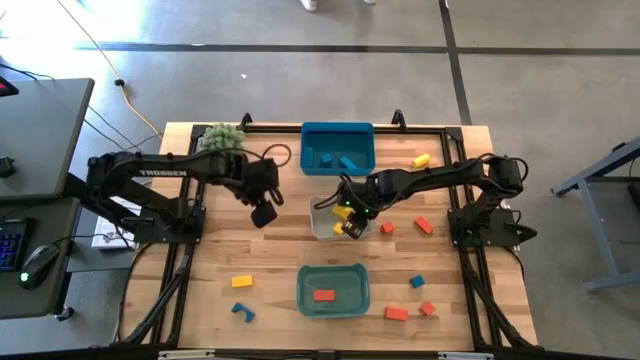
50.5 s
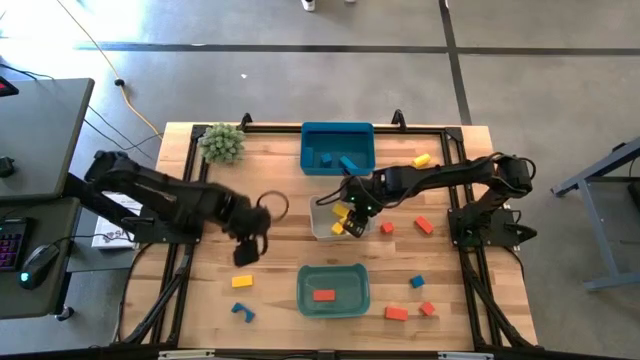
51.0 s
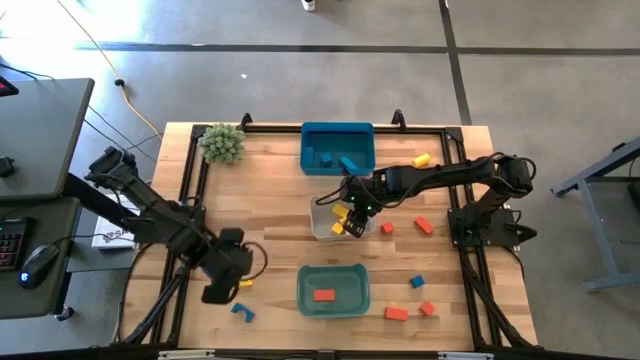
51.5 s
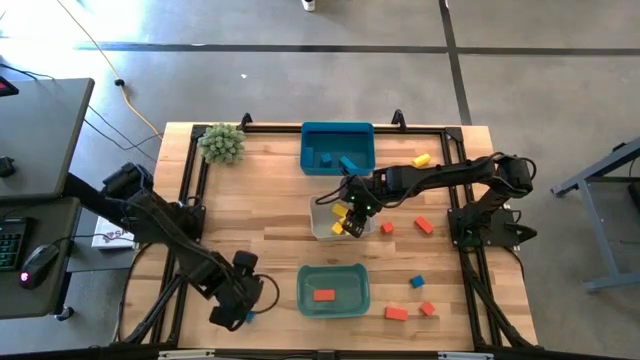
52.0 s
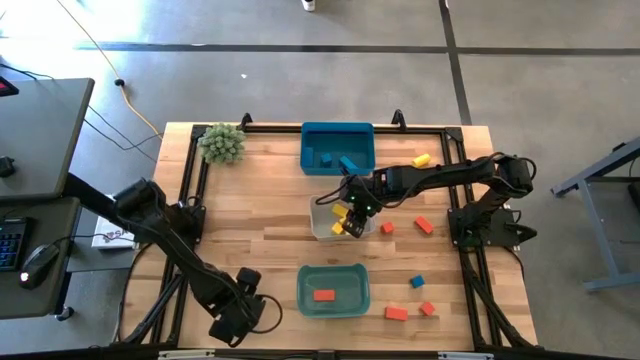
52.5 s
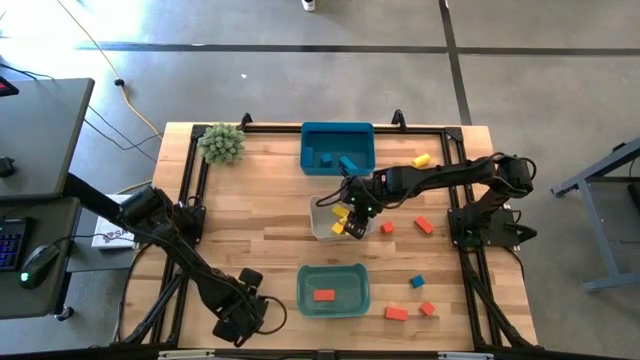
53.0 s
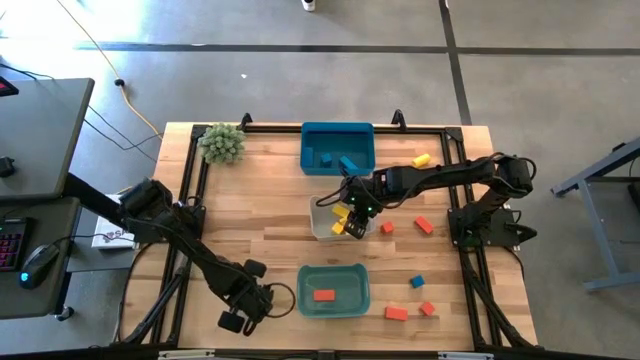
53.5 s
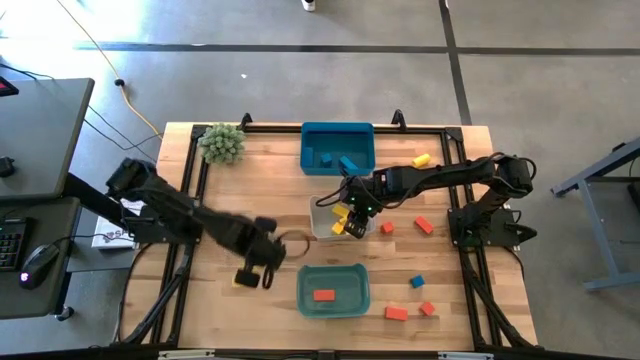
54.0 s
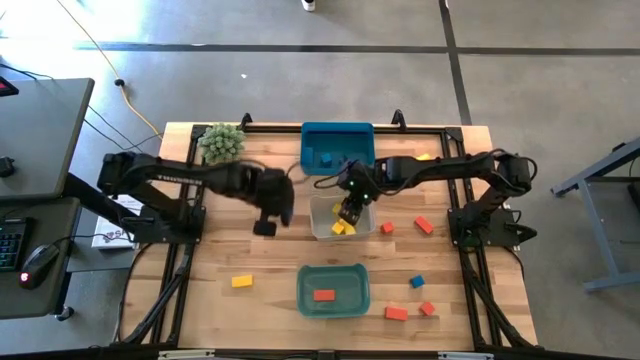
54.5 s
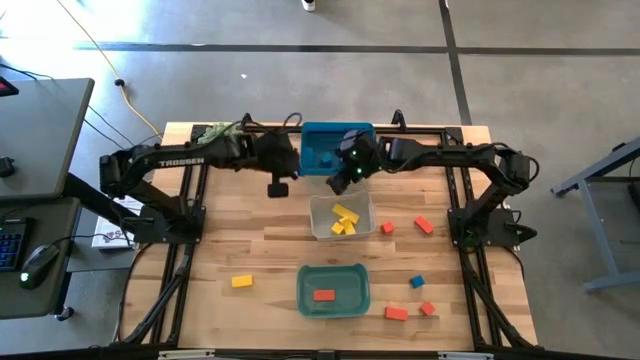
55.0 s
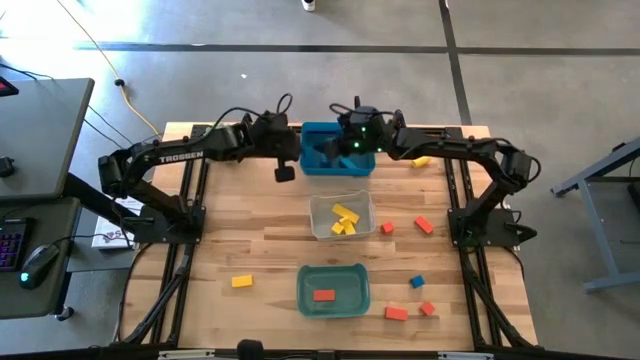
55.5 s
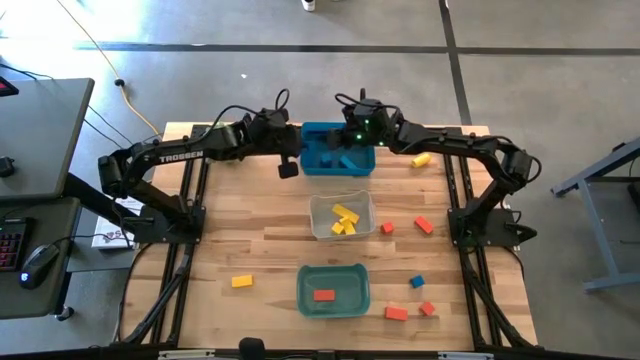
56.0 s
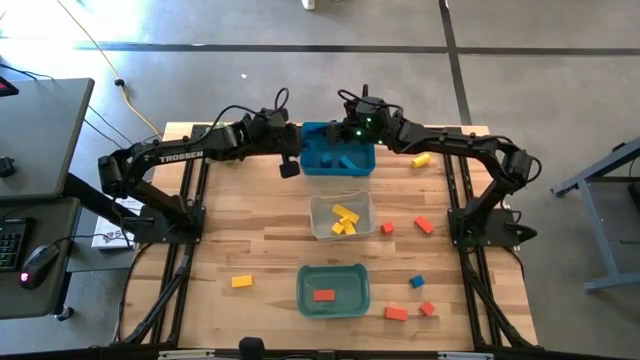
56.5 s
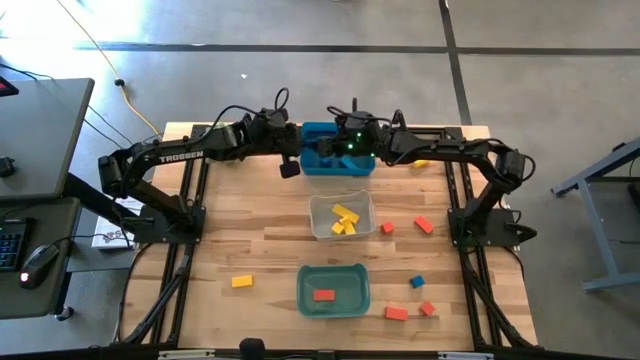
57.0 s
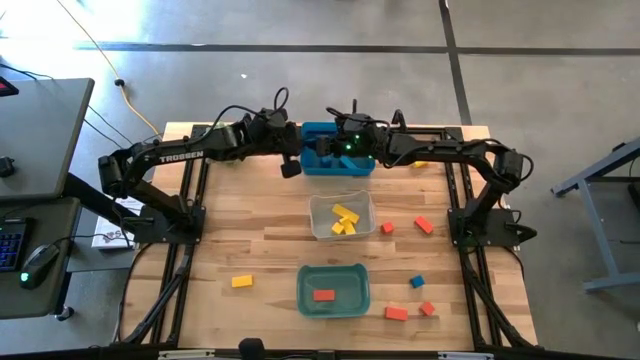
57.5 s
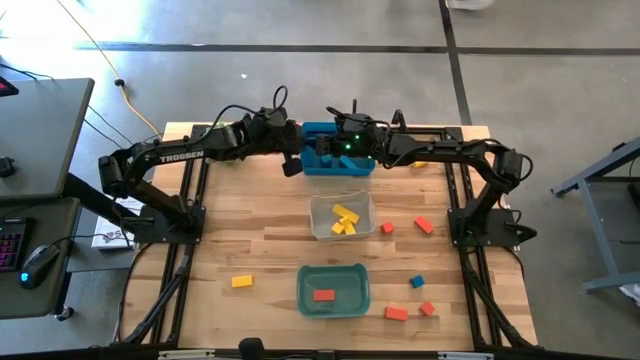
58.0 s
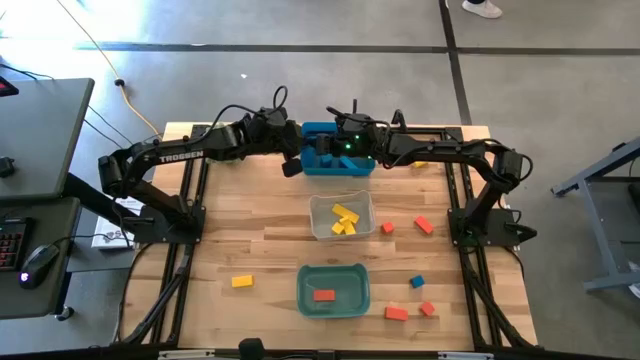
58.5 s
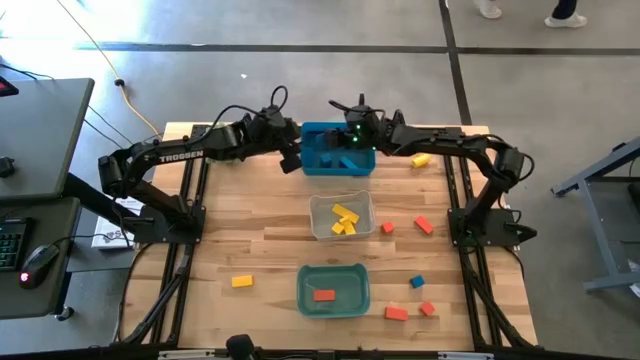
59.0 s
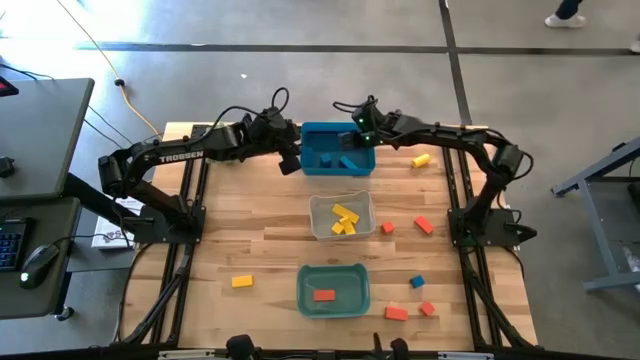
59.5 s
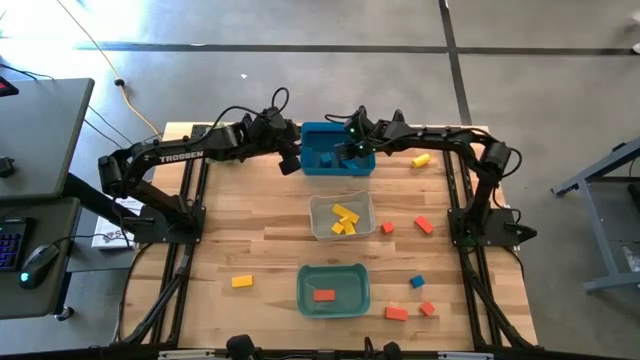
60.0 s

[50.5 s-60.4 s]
Task: Sort & place blocks by color
Put the blue block into the blue bin

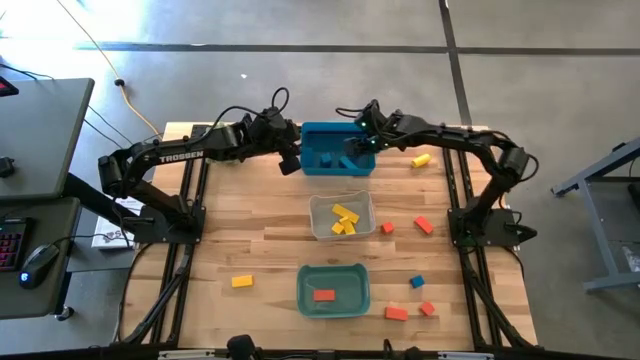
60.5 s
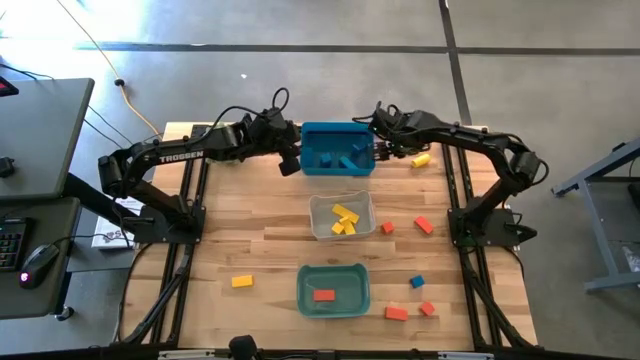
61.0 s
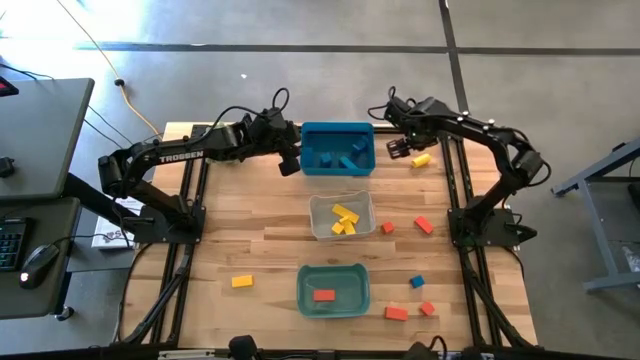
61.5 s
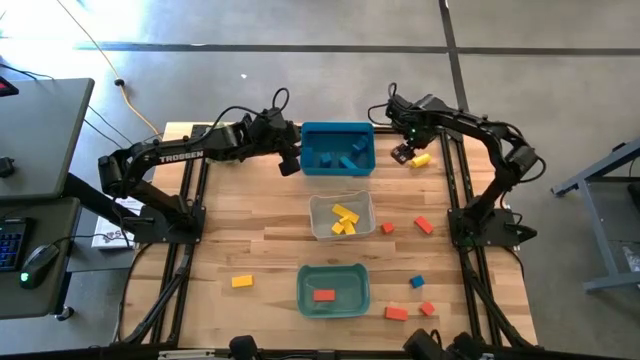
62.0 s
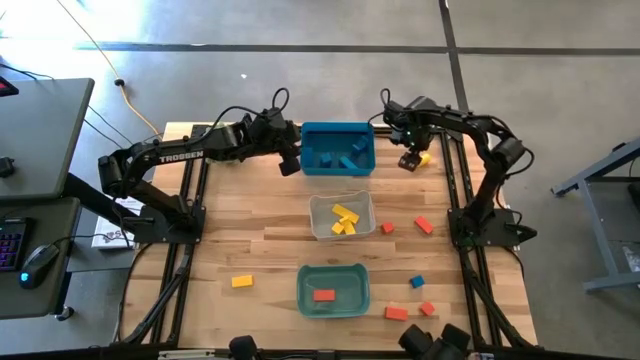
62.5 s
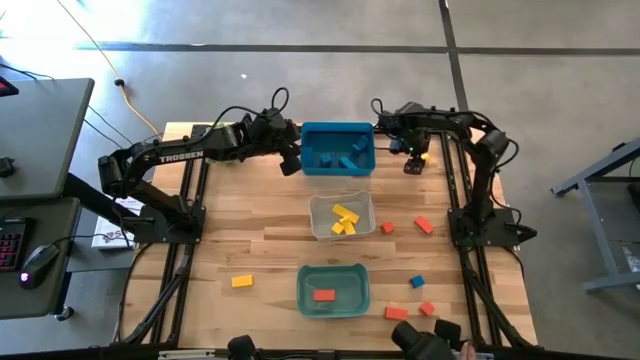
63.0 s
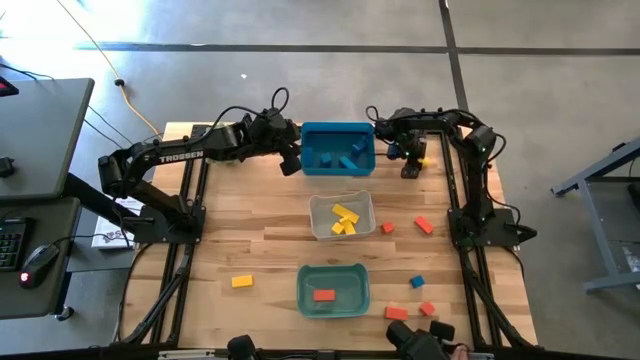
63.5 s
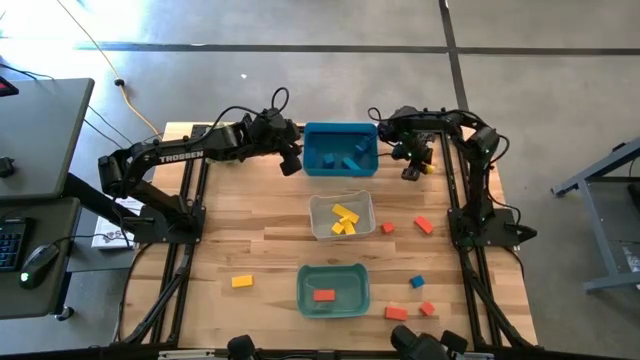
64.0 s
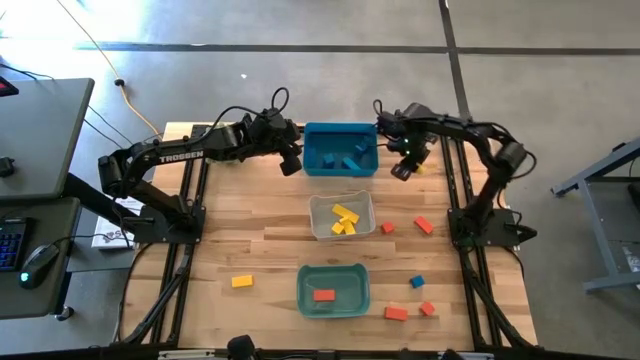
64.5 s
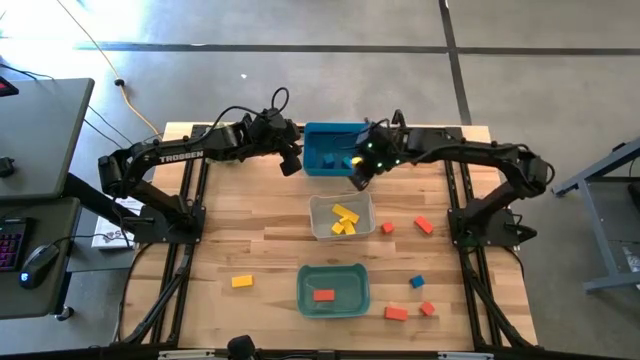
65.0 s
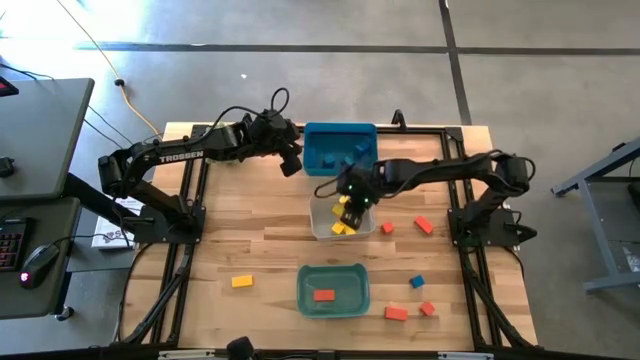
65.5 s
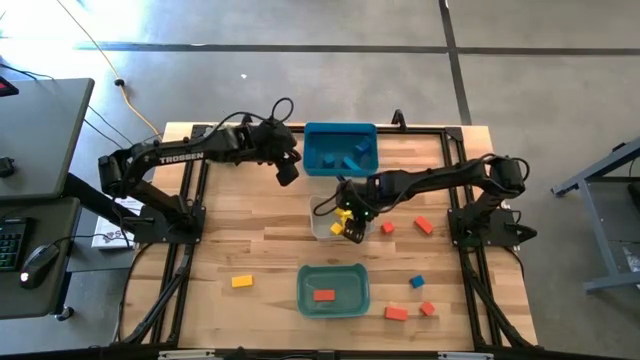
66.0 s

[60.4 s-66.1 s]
Put the yellow block into the white bin

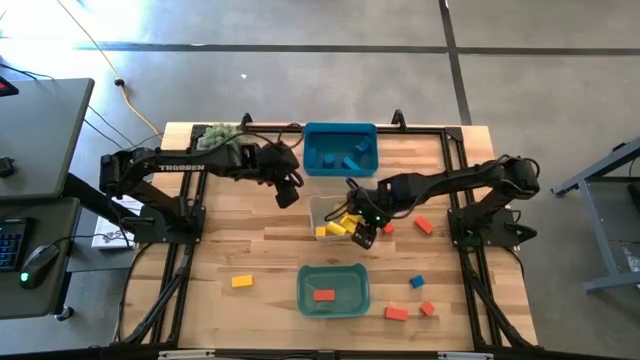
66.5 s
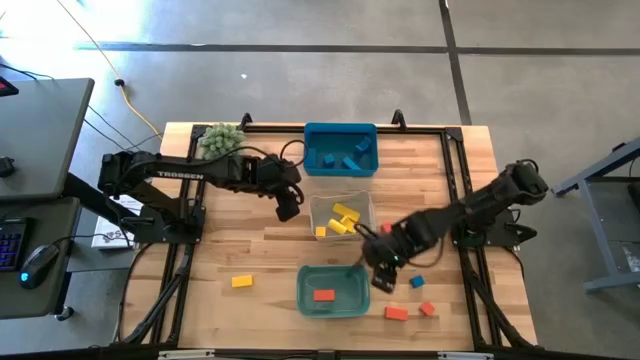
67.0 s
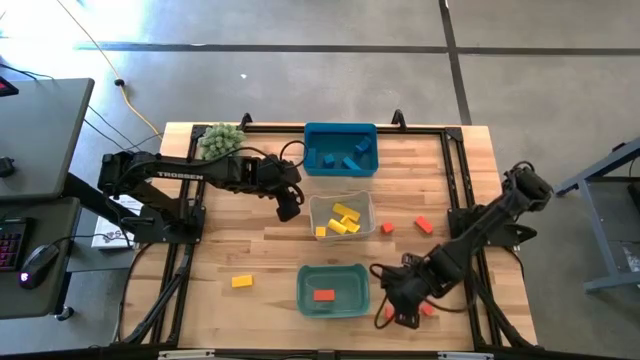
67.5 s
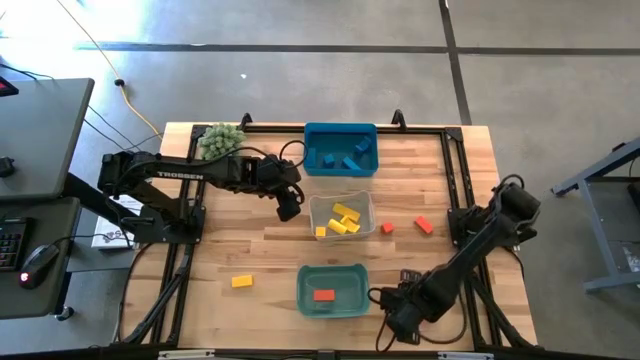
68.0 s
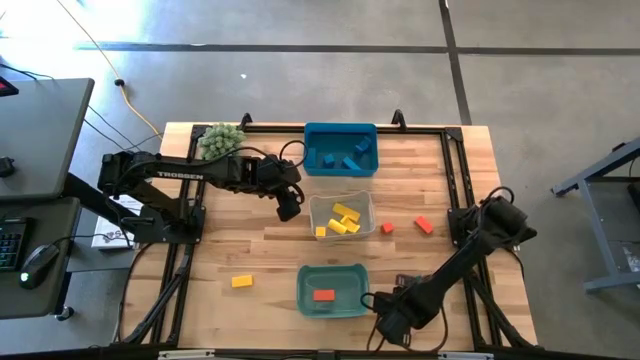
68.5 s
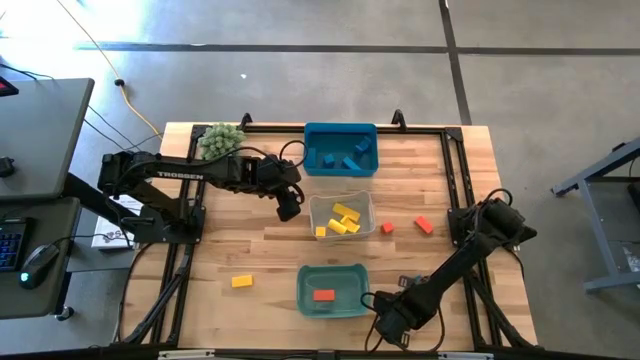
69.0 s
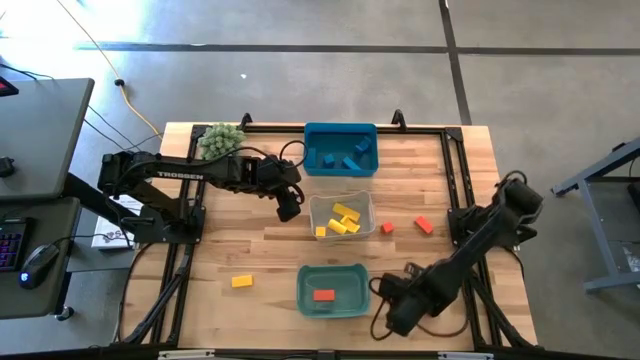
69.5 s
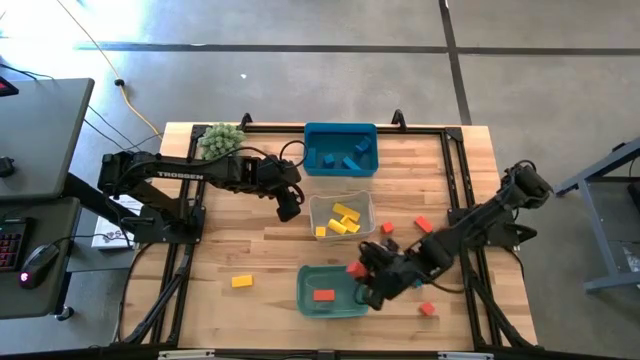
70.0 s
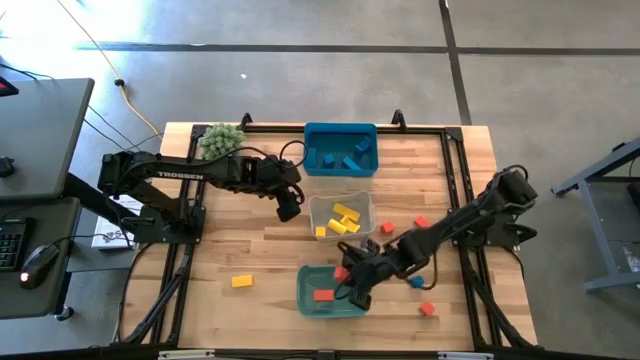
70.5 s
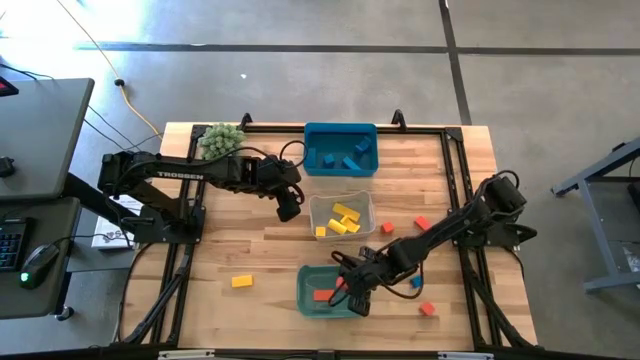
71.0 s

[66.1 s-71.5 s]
Put the orange block into the green bin
